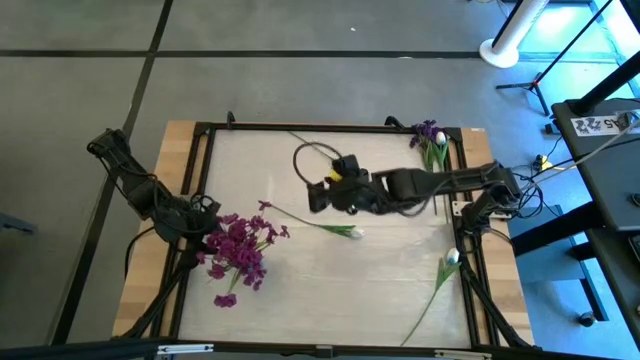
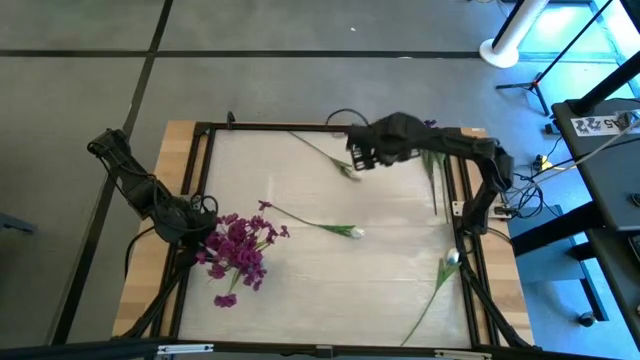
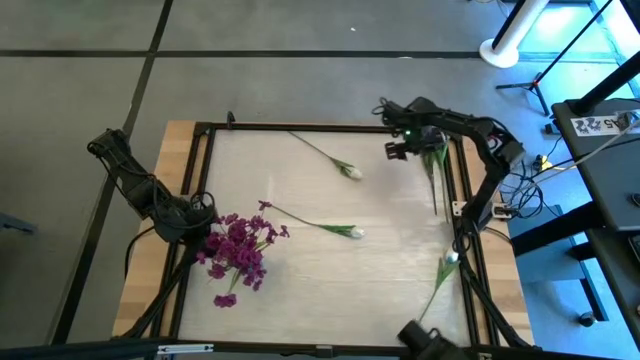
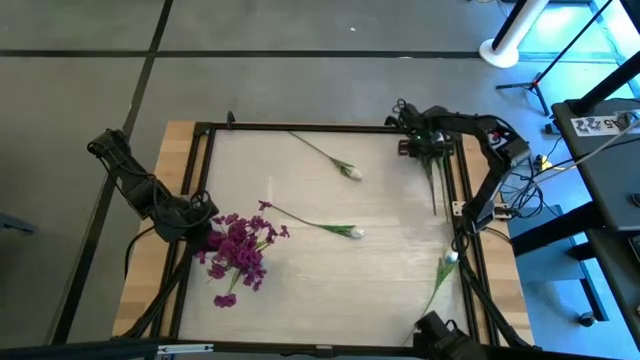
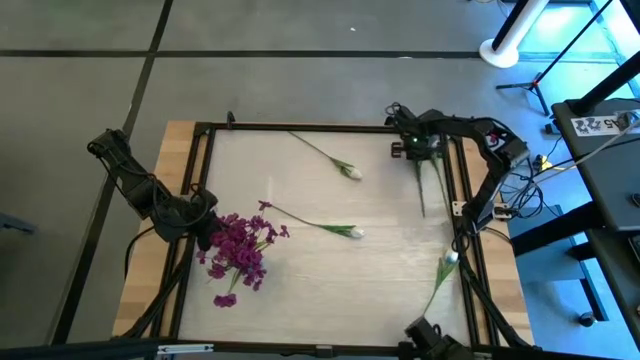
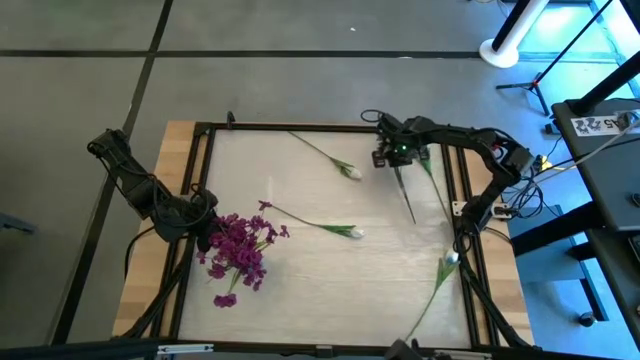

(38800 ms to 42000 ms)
Task: Sort flowers into vase by color
Put the dark purple flowers into the blue vase

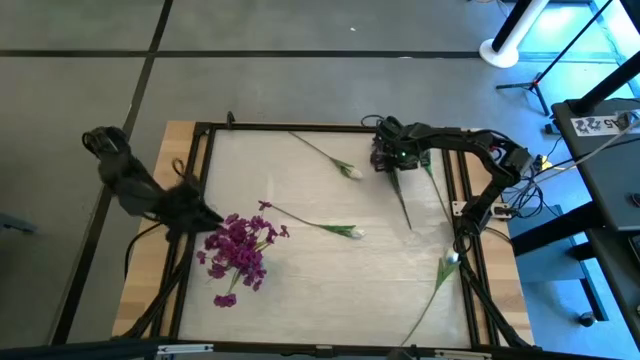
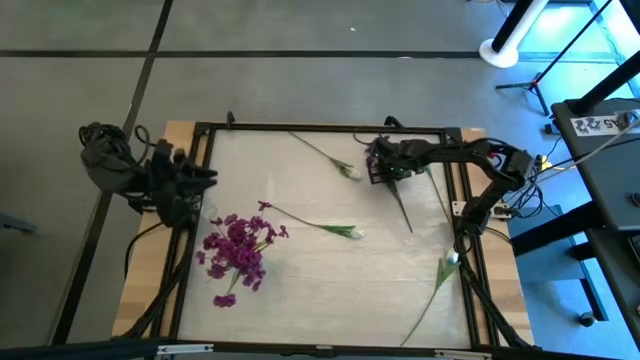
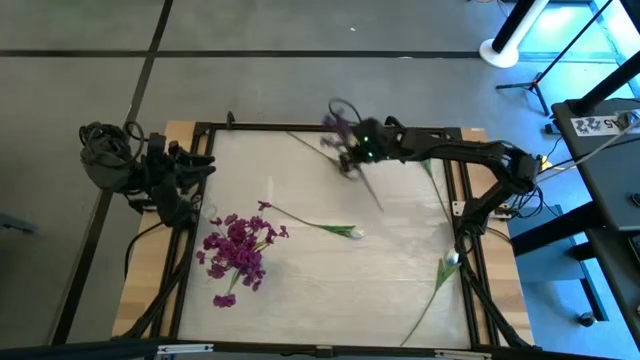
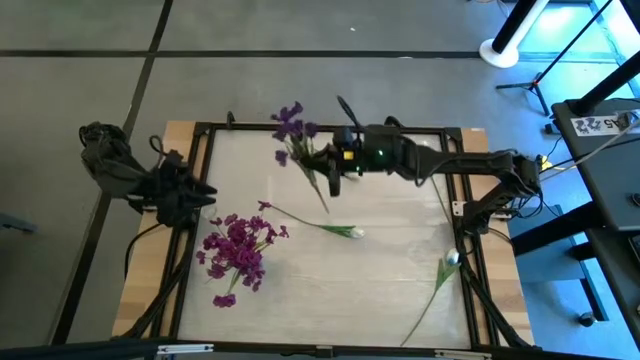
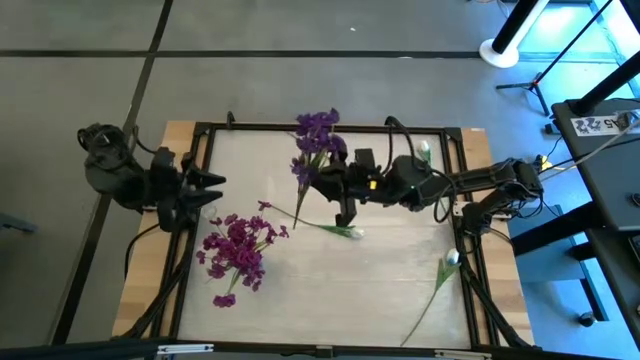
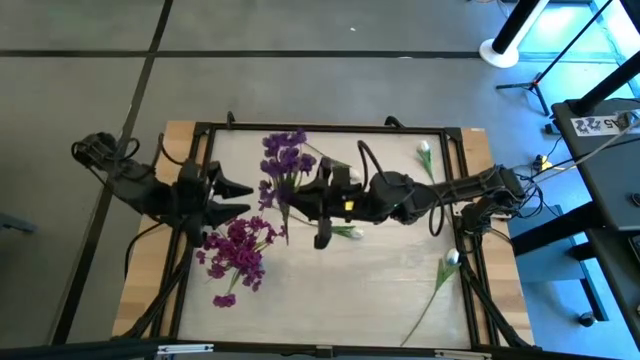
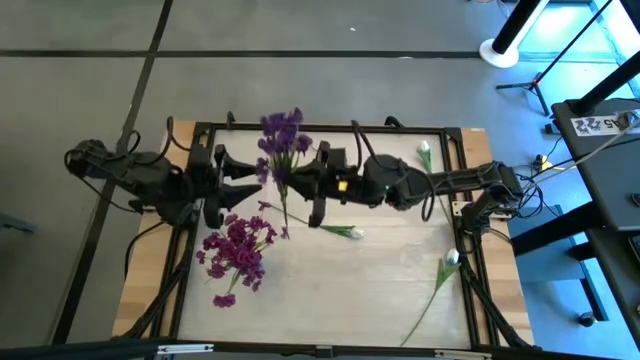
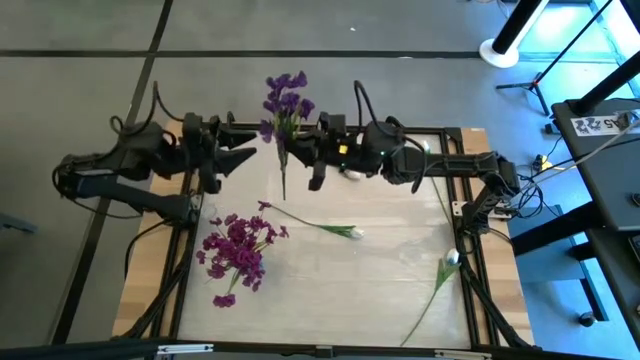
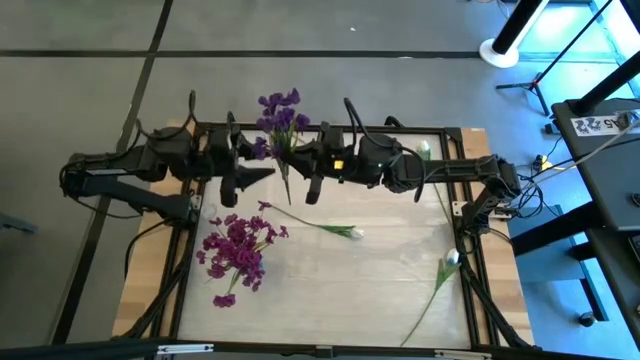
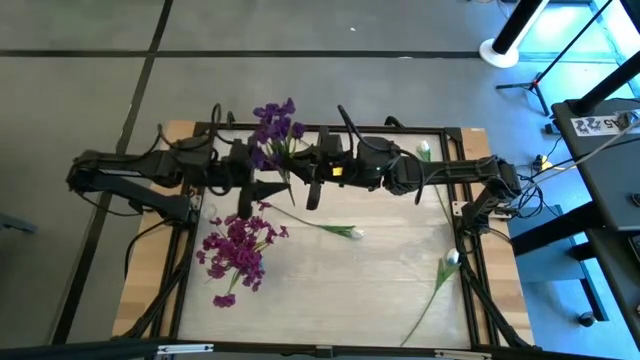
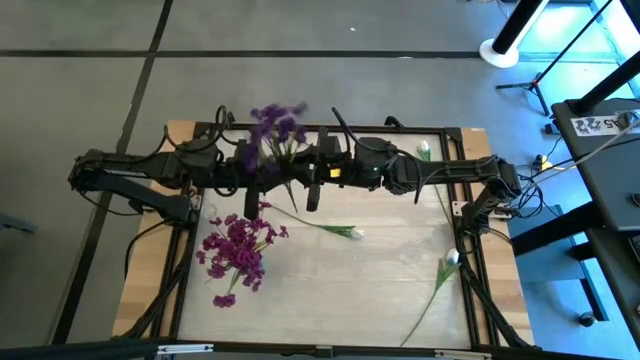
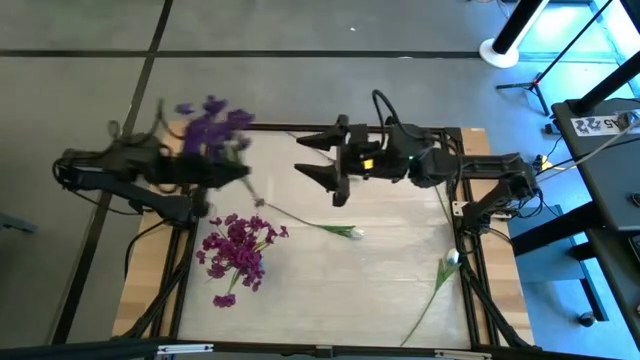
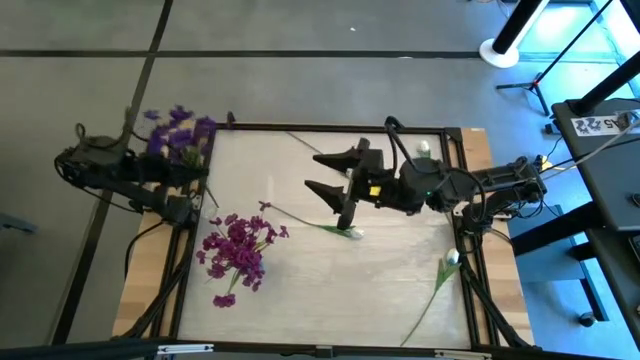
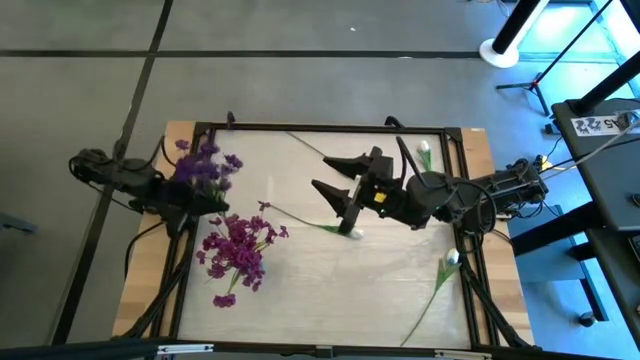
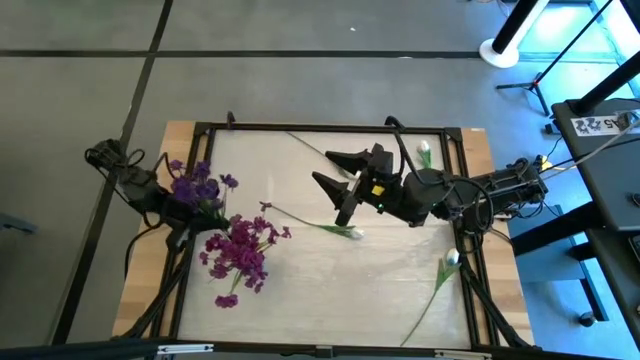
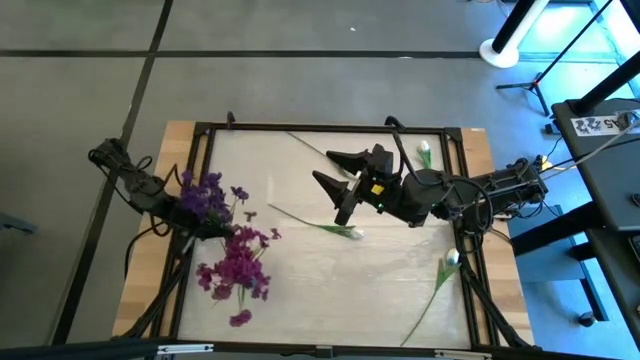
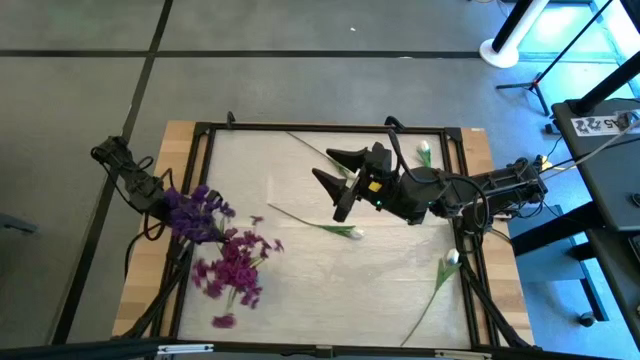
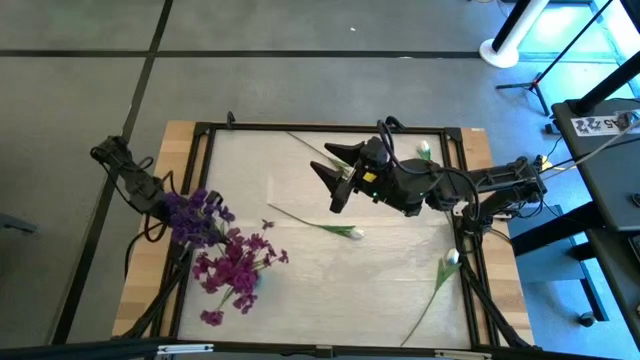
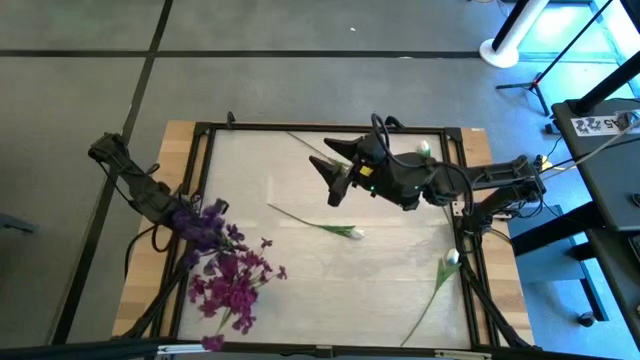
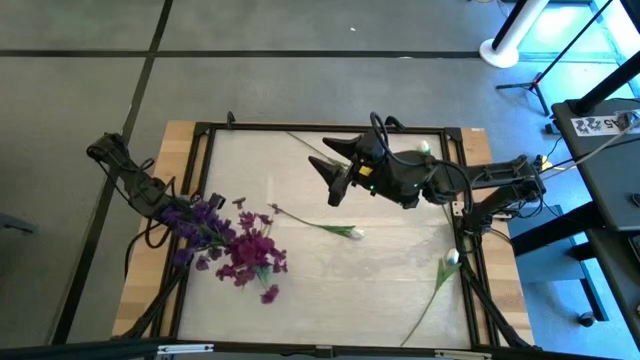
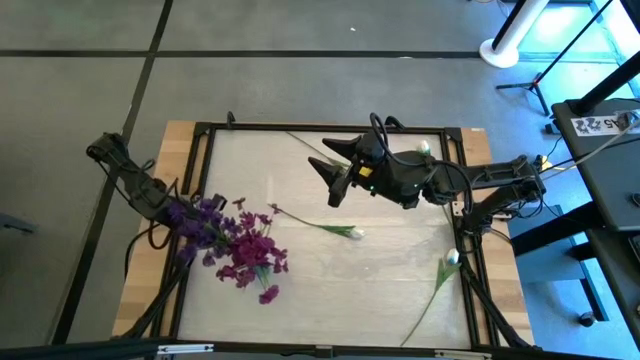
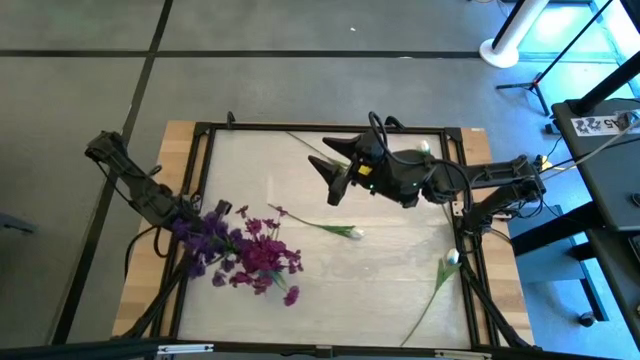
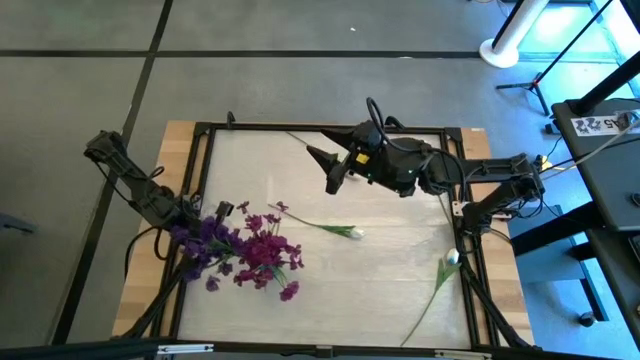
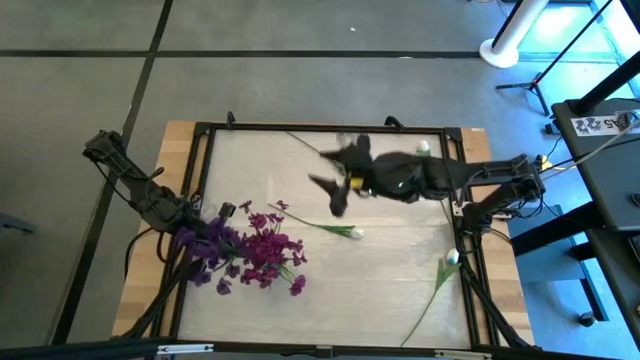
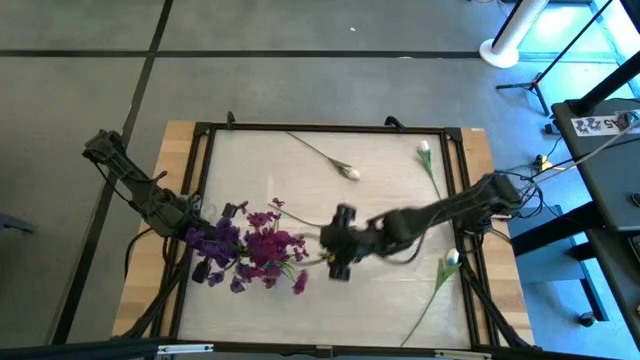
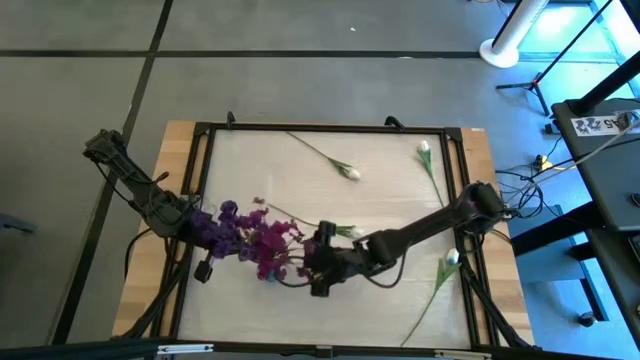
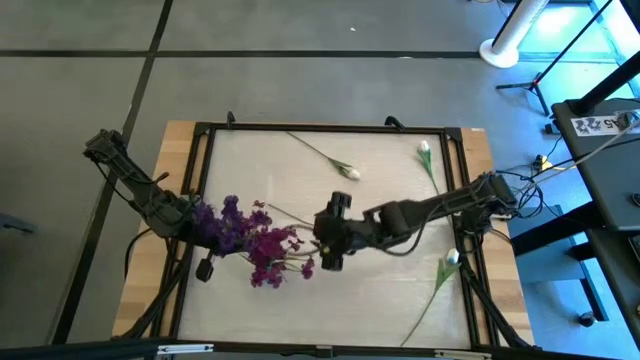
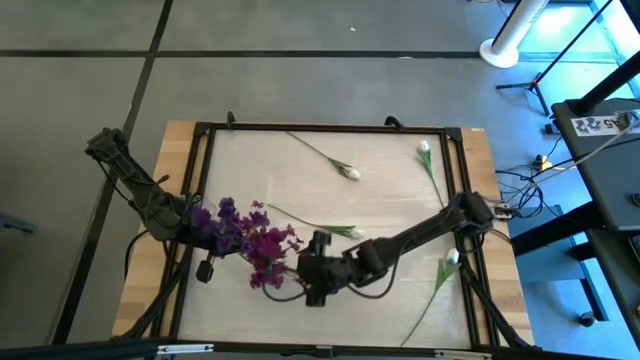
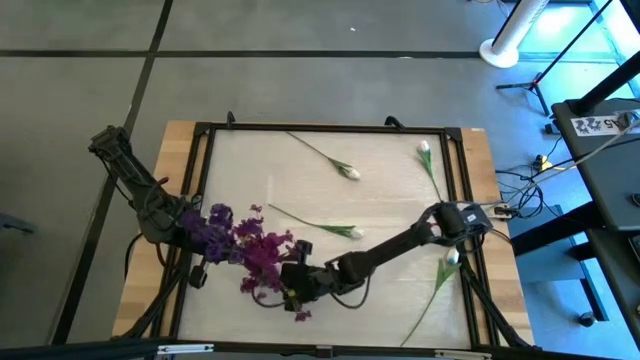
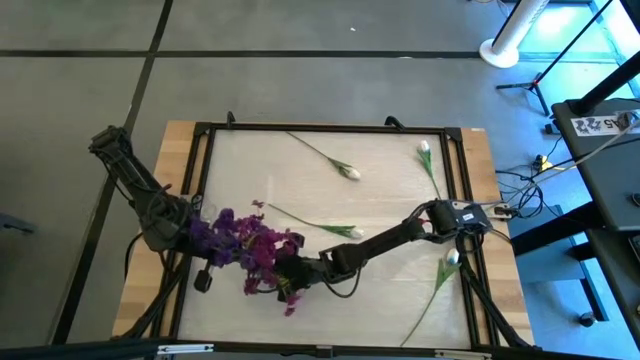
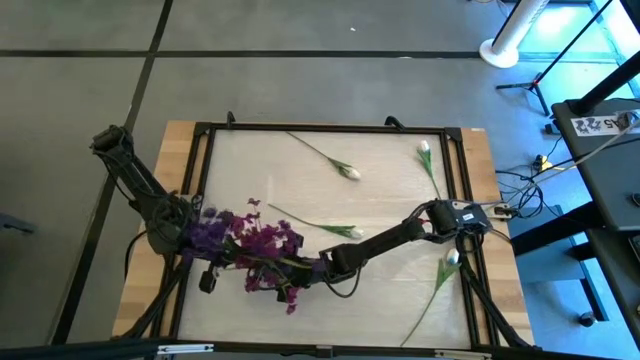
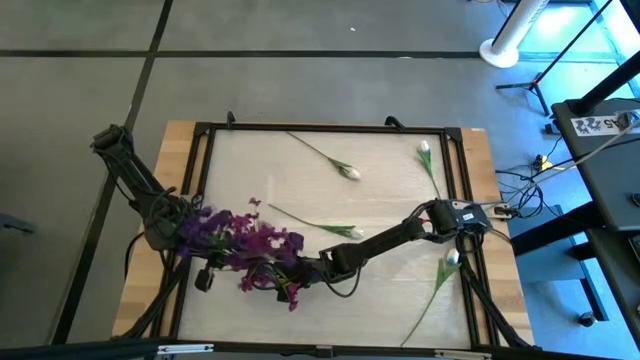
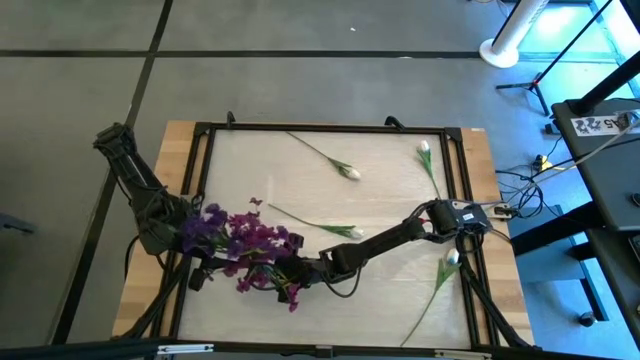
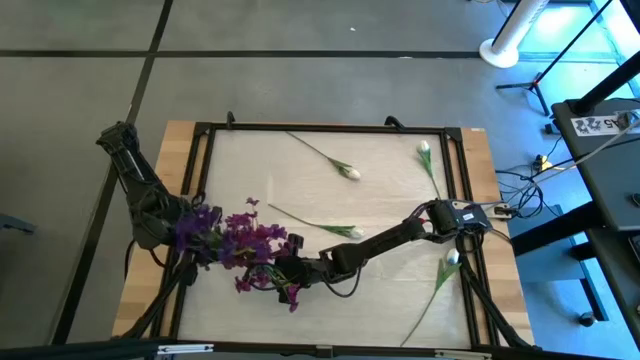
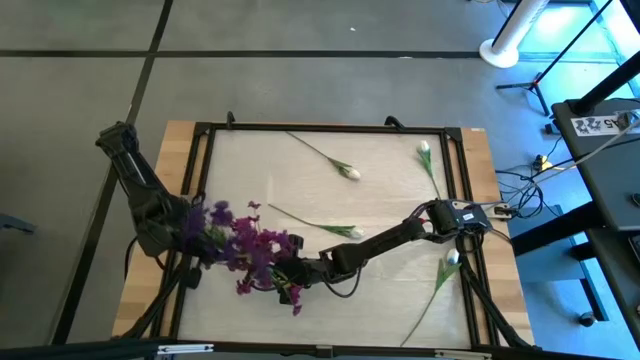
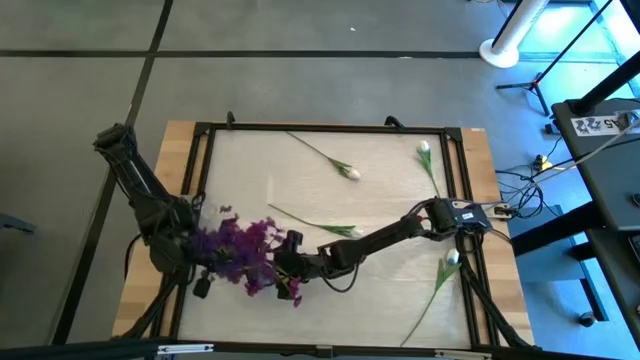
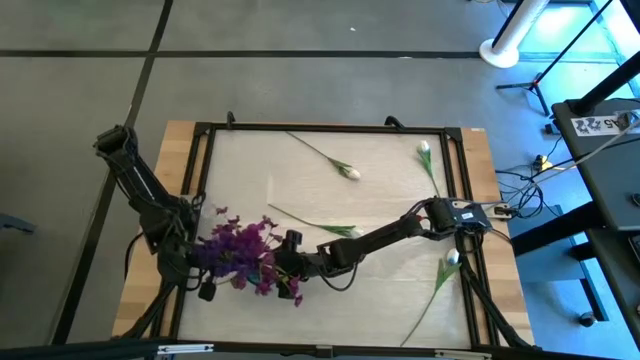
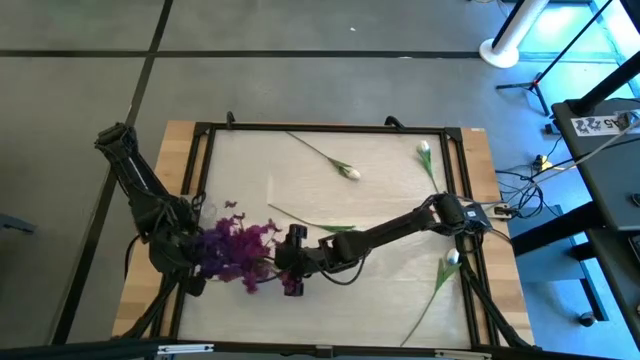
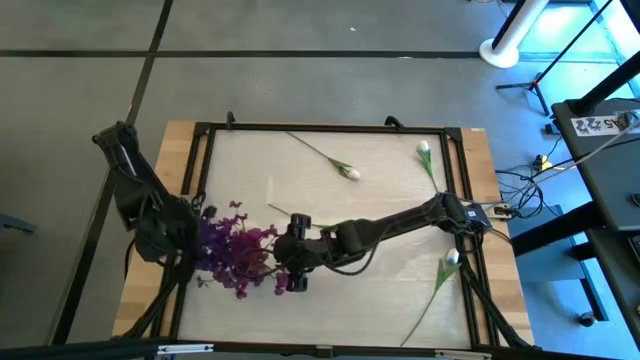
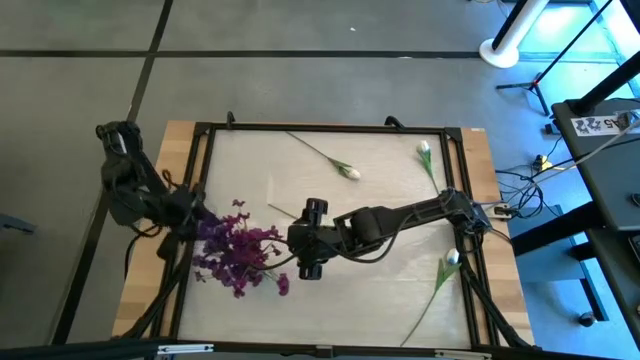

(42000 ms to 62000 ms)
Put the dark purple flowers into the blue vase
